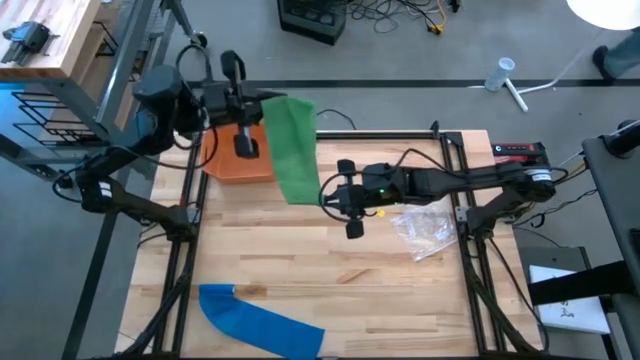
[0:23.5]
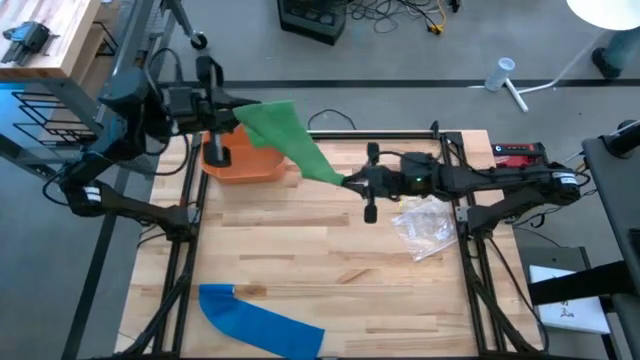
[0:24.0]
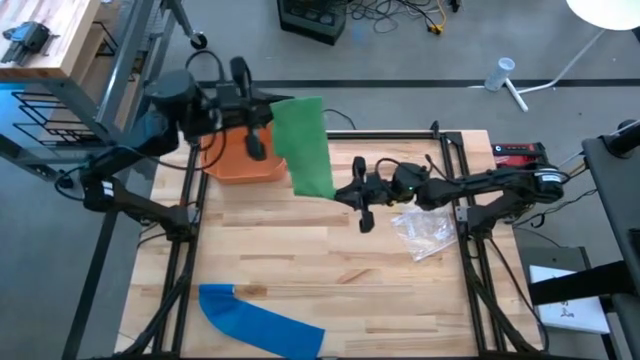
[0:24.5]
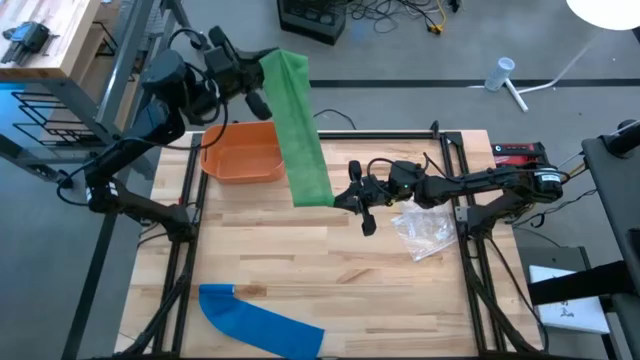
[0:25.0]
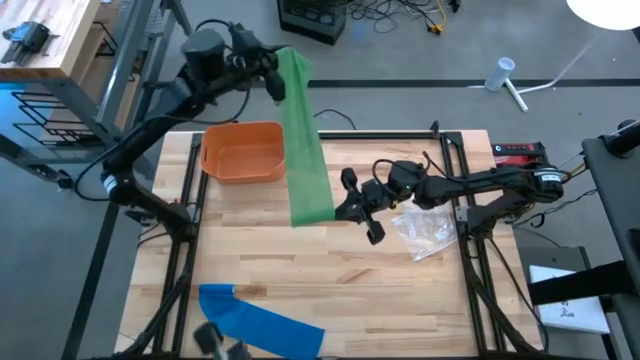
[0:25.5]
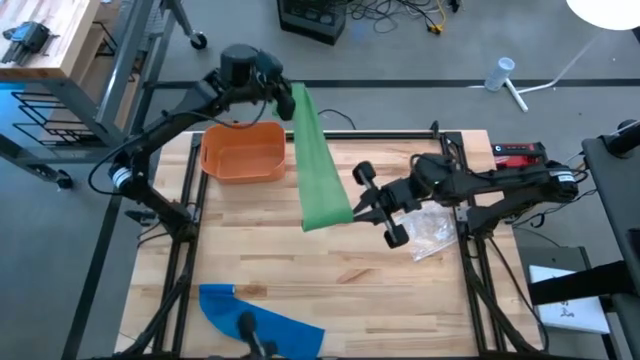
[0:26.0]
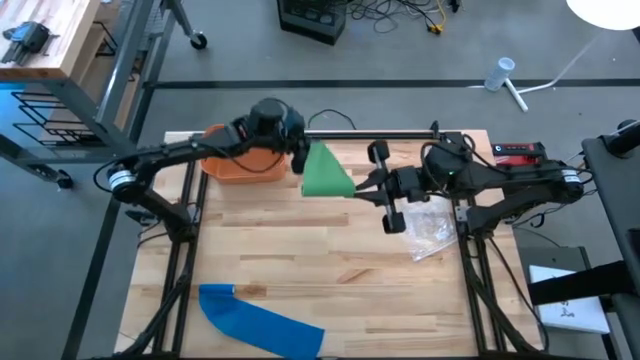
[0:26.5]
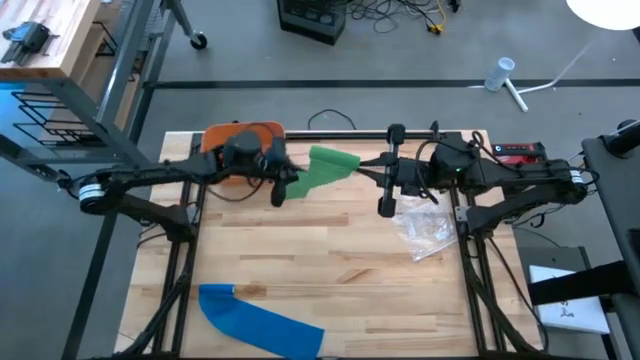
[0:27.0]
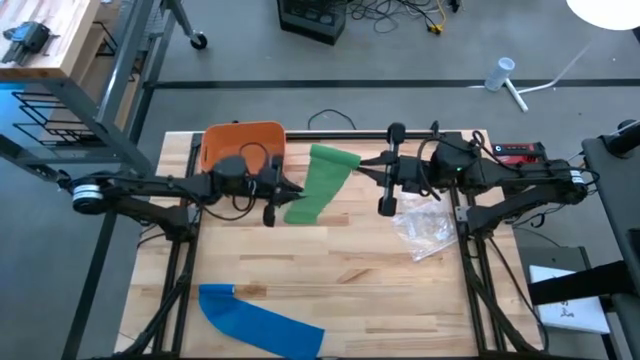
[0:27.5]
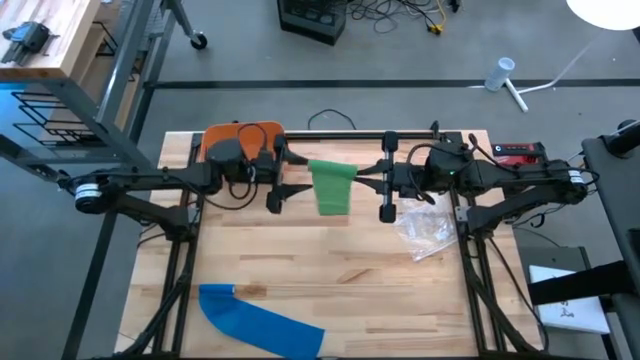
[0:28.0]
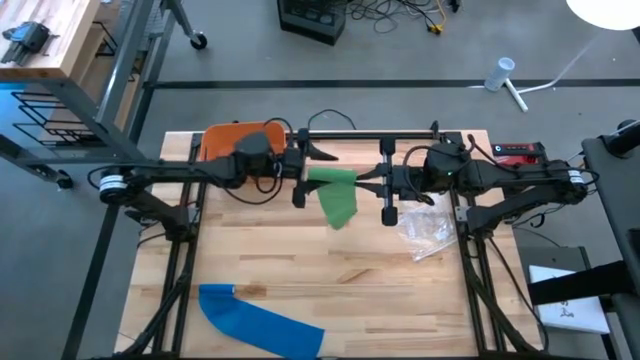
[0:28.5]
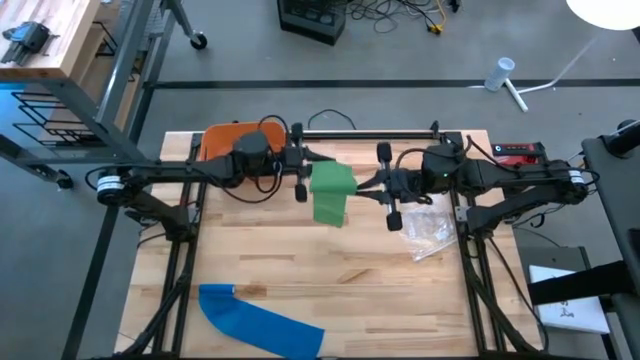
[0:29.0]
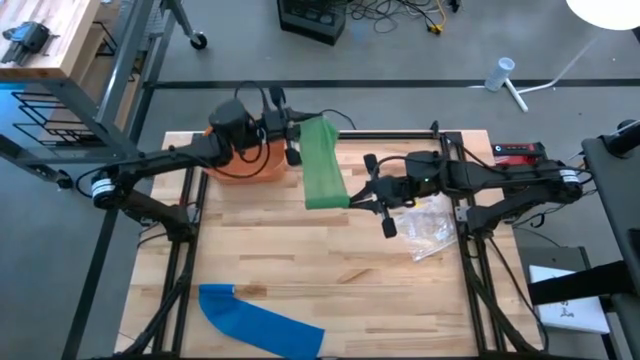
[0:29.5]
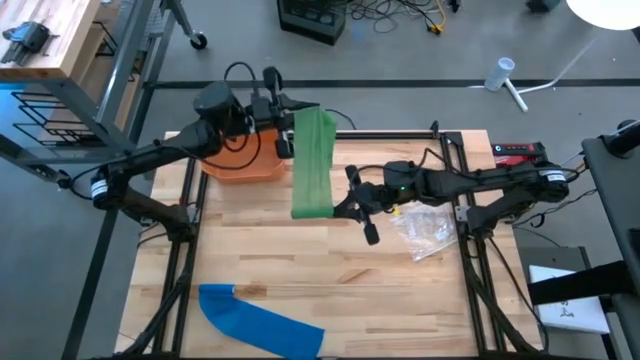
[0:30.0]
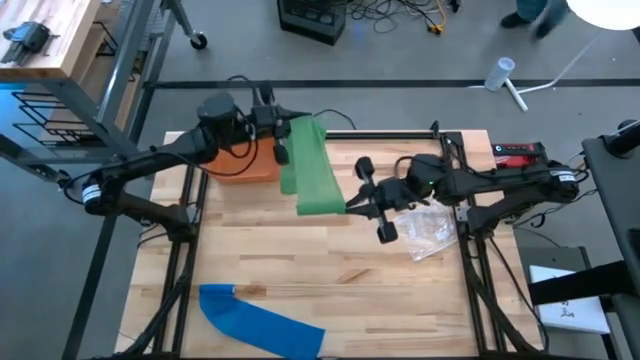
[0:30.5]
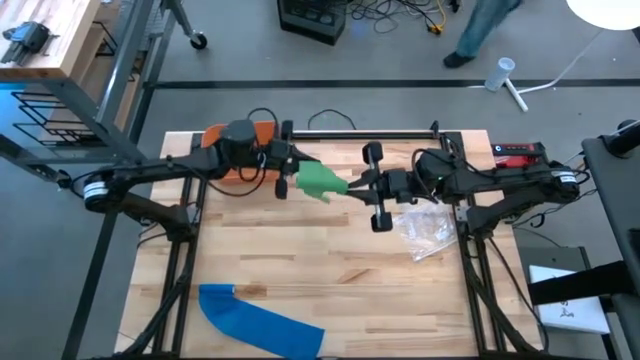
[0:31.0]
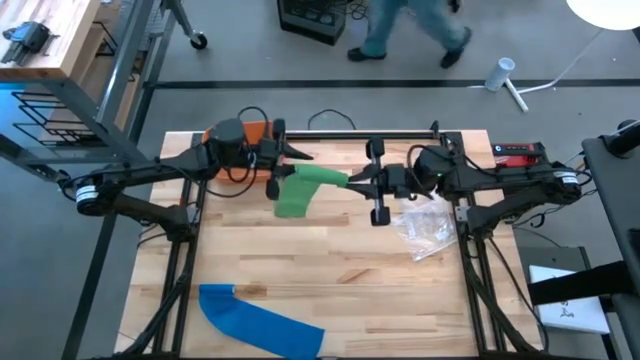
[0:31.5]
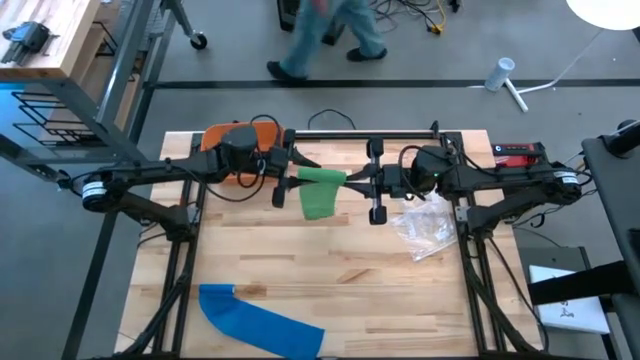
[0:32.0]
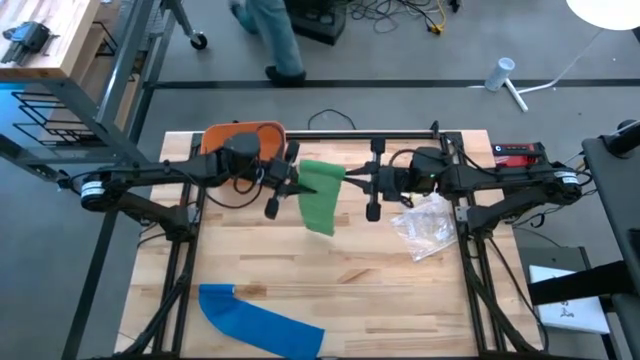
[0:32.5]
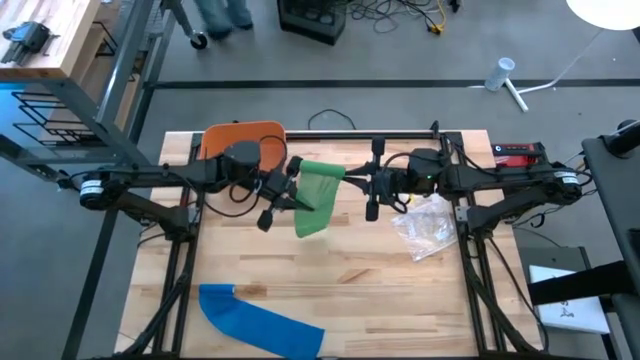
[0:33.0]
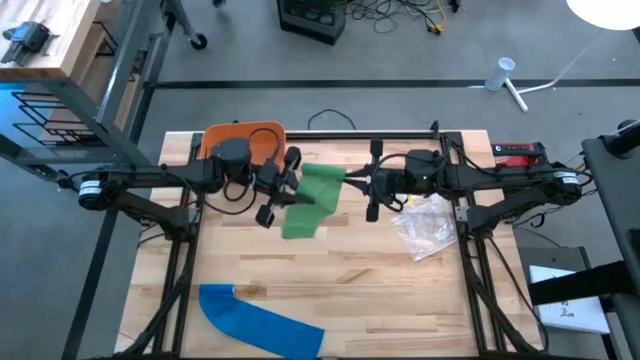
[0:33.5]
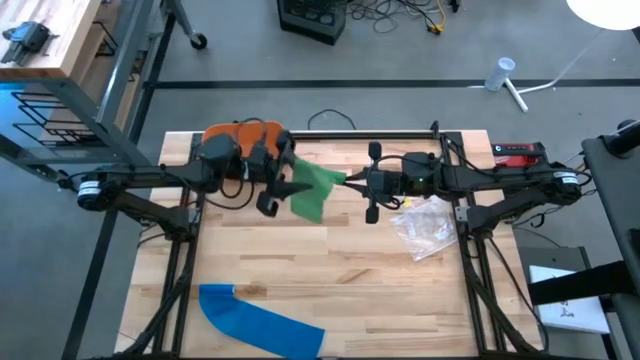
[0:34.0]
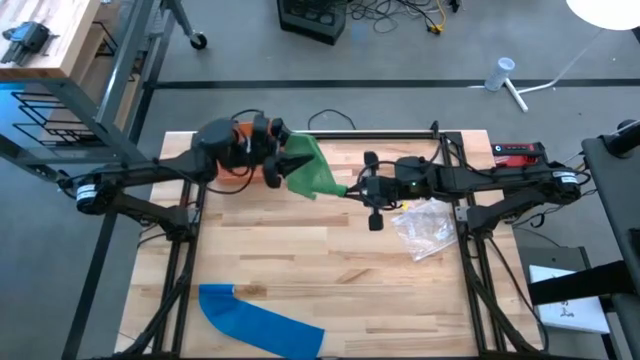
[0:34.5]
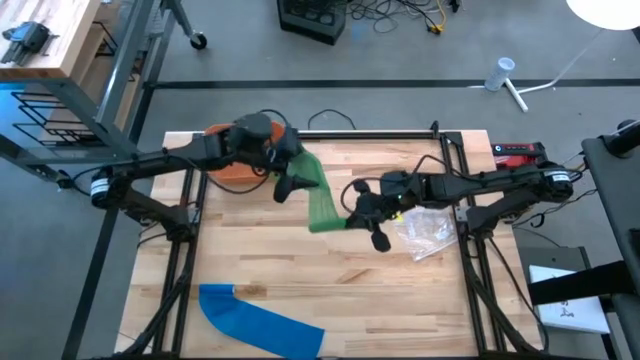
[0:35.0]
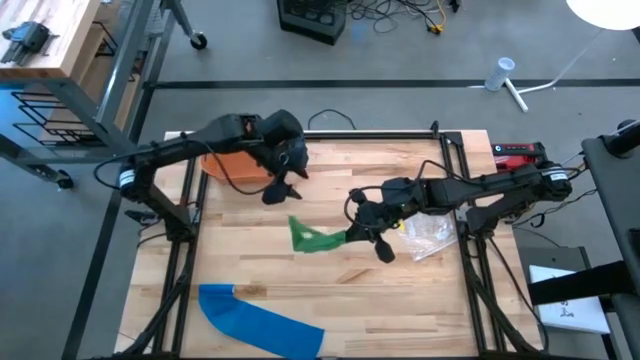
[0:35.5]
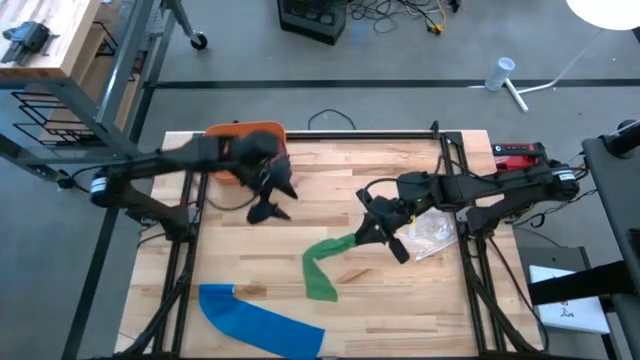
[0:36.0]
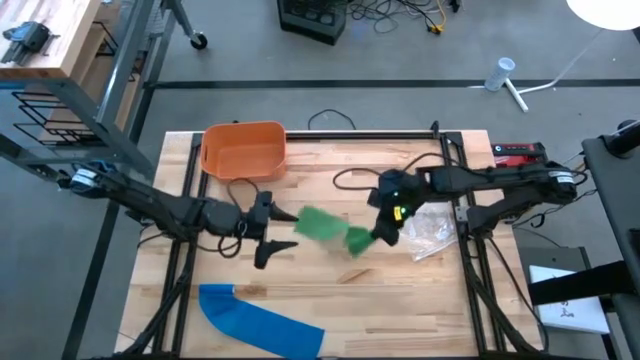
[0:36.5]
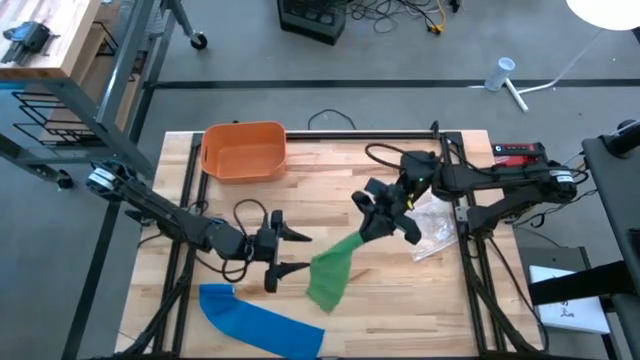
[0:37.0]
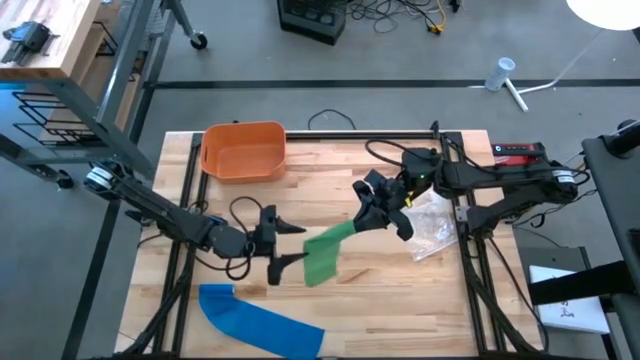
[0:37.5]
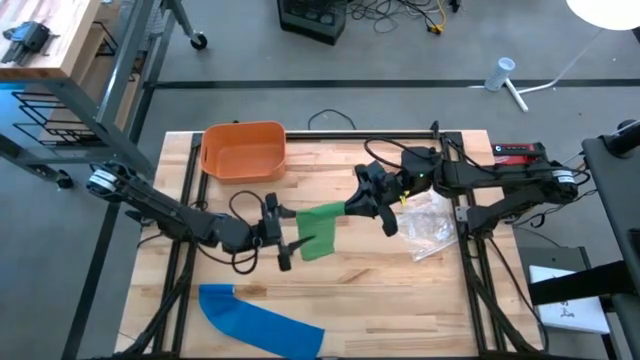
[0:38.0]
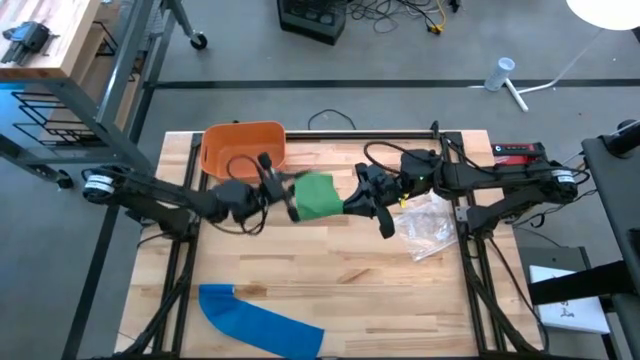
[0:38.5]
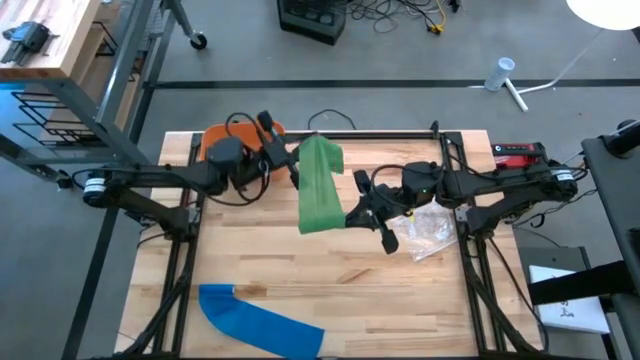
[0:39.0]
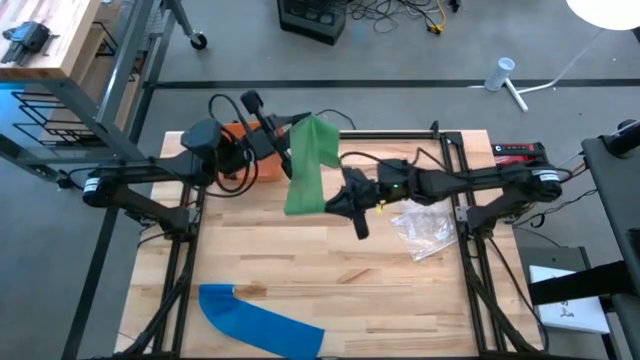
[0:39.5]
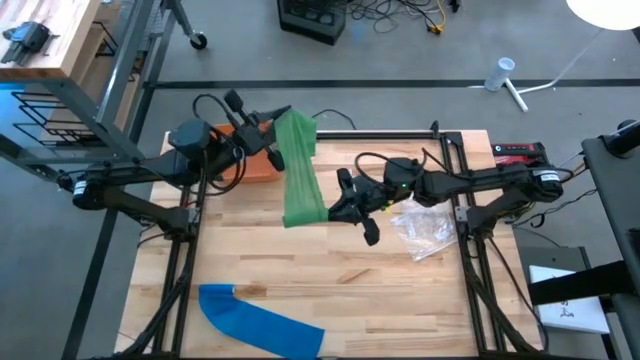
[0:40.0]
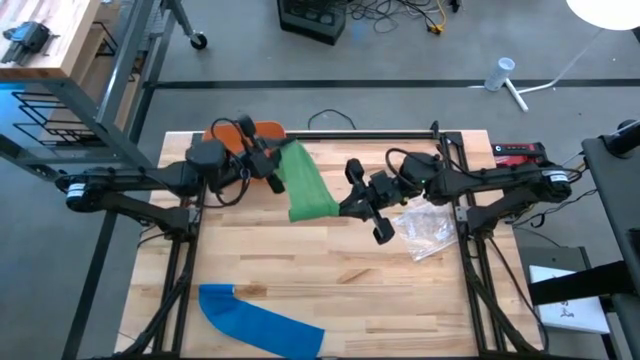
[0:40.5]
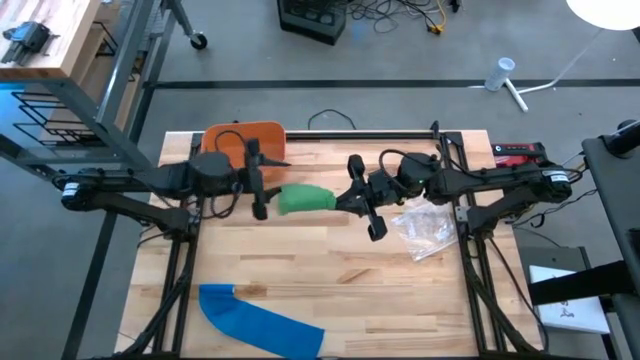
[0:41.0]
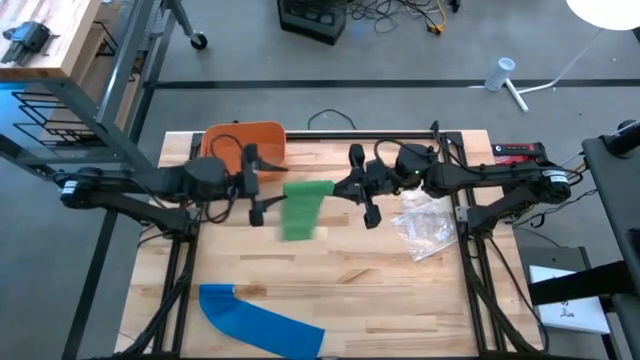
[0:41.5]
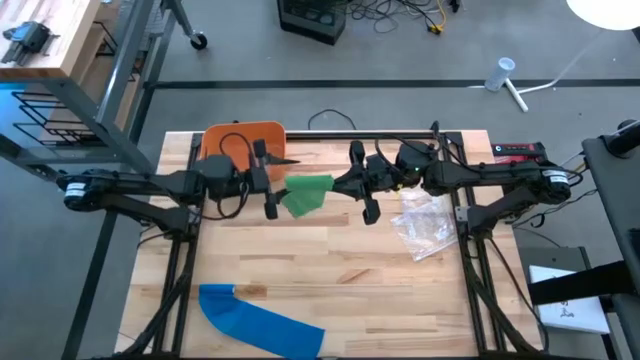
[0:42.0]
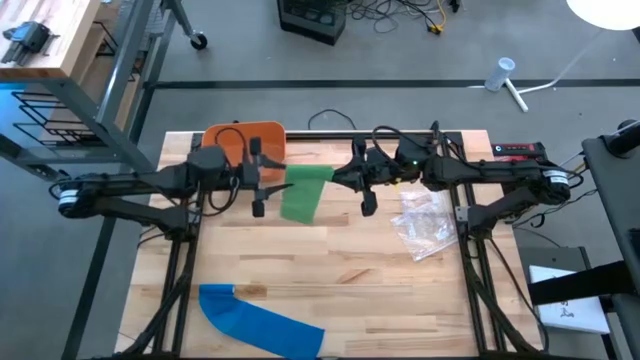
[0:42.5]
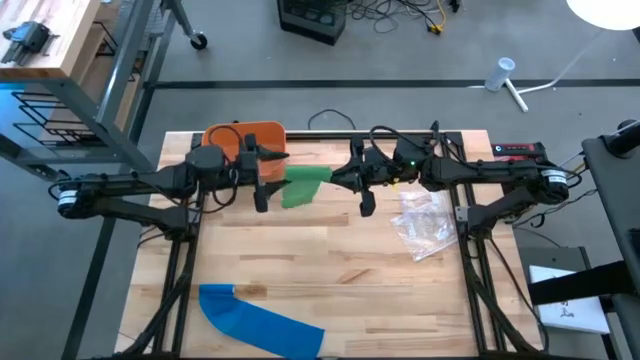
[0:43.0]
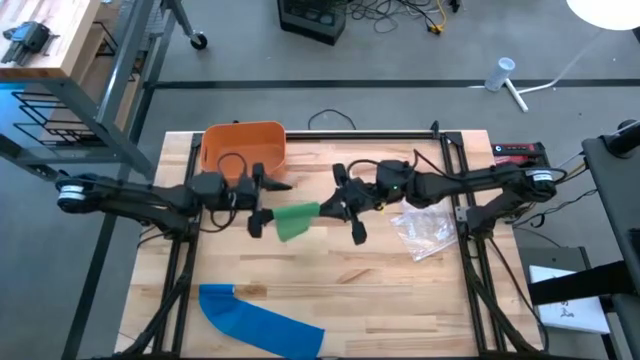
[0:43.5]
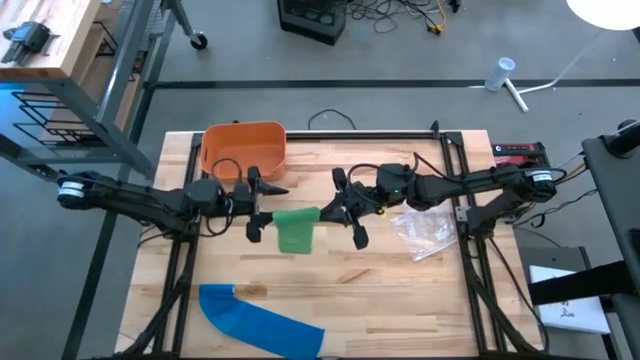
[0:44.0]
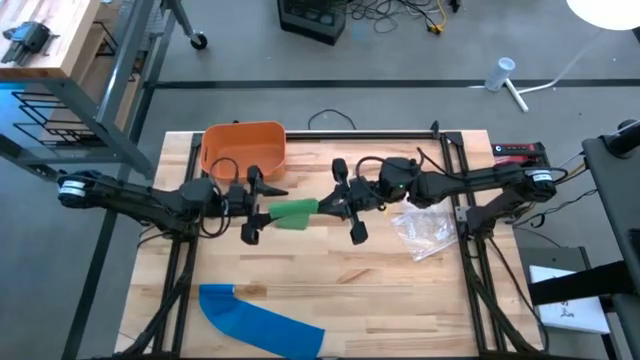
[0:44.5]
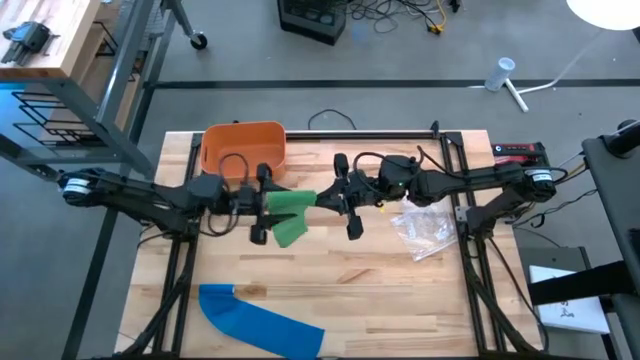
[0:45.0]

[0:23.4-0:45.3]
Task: Roll bandage
Roll the green bandage
